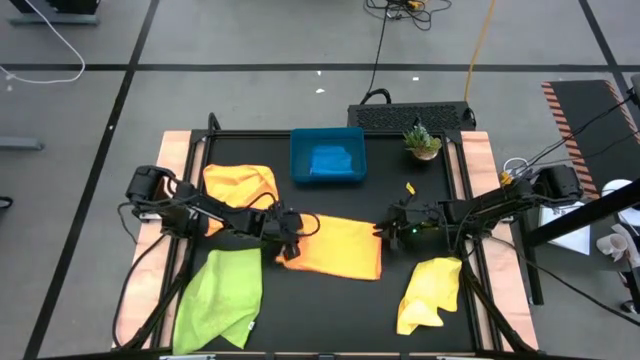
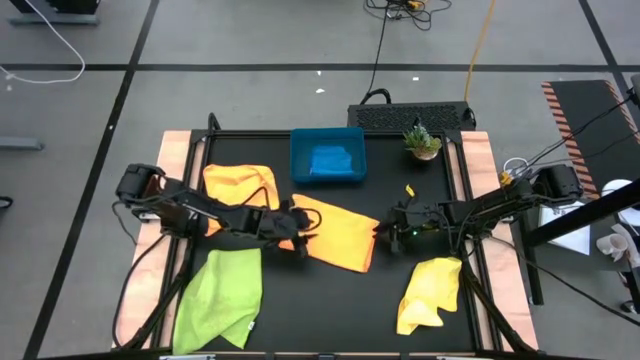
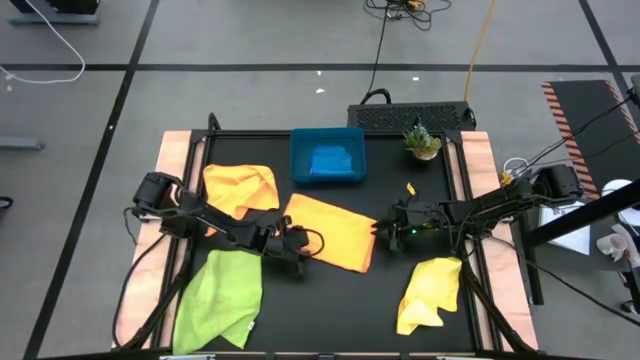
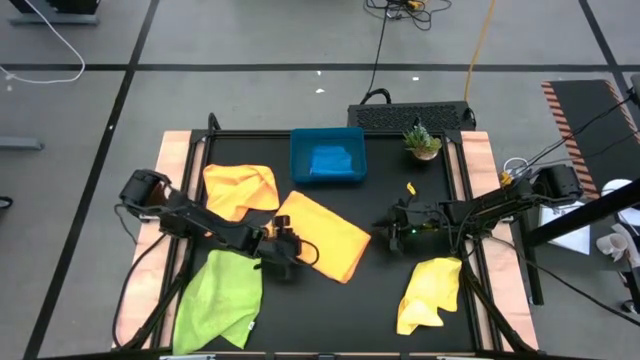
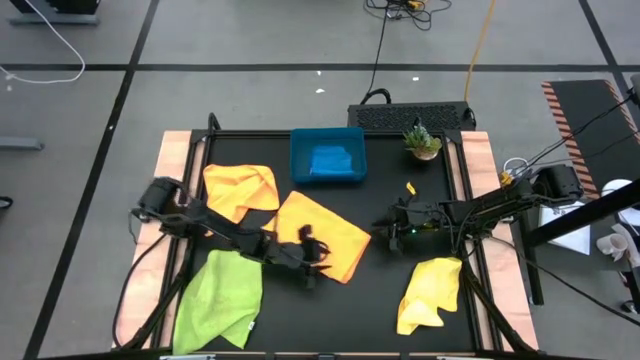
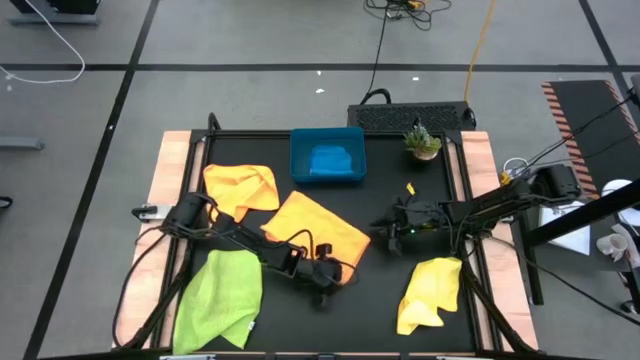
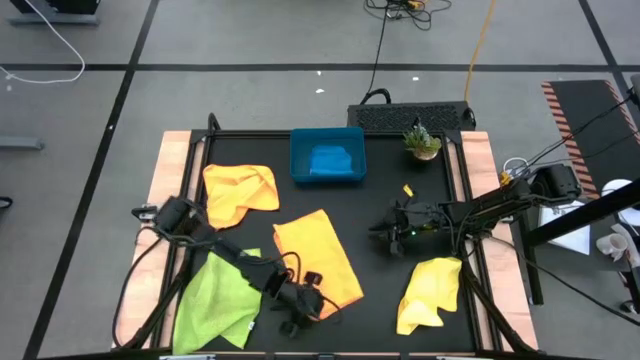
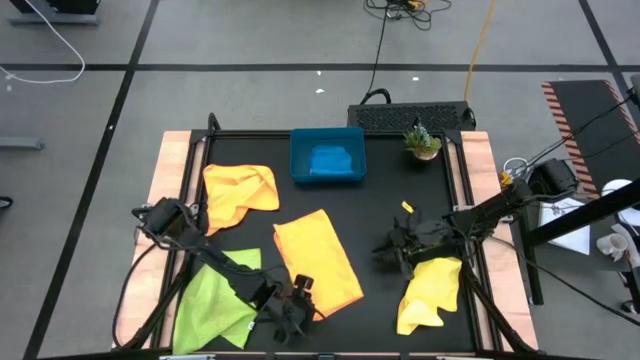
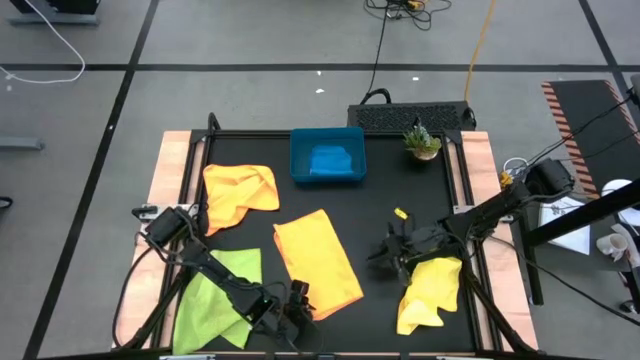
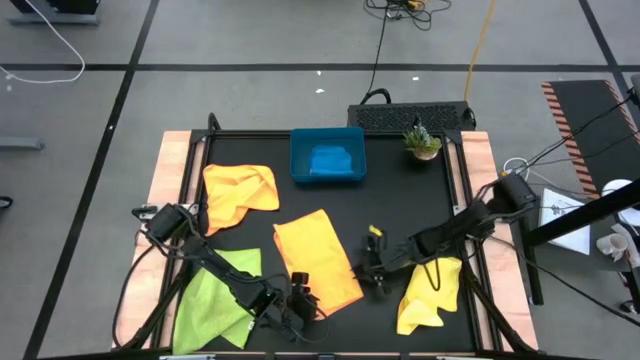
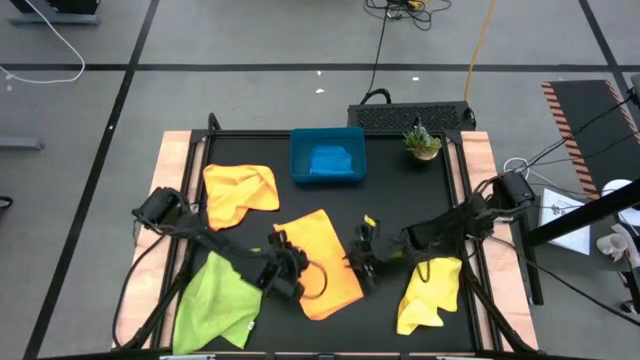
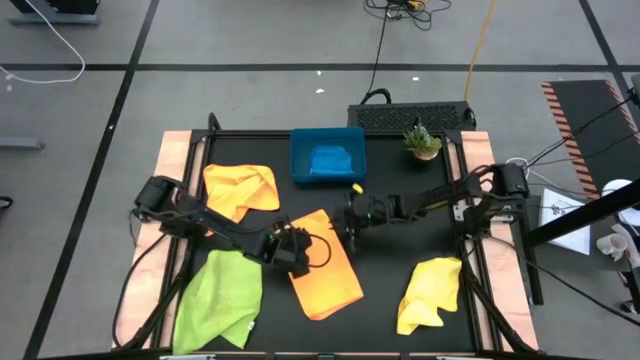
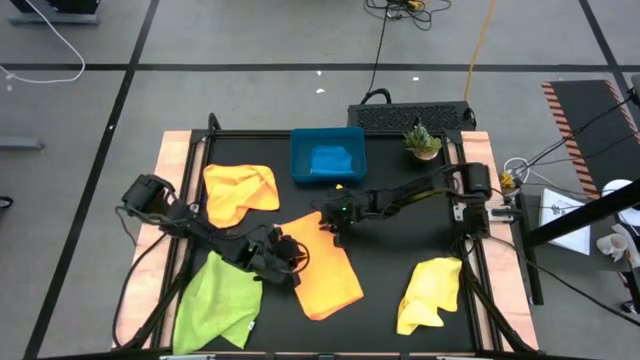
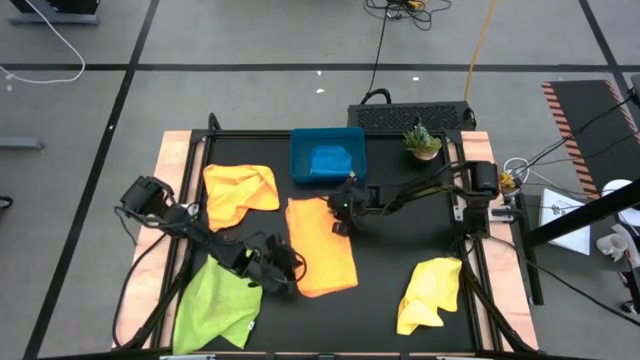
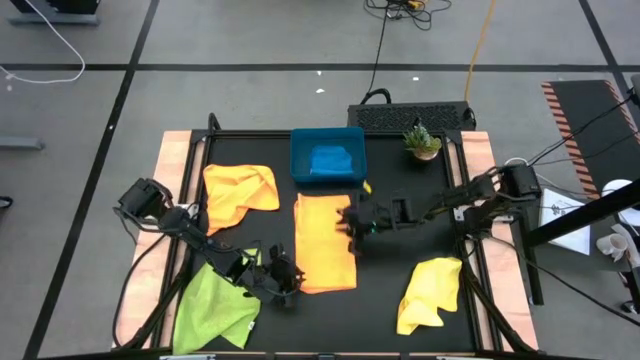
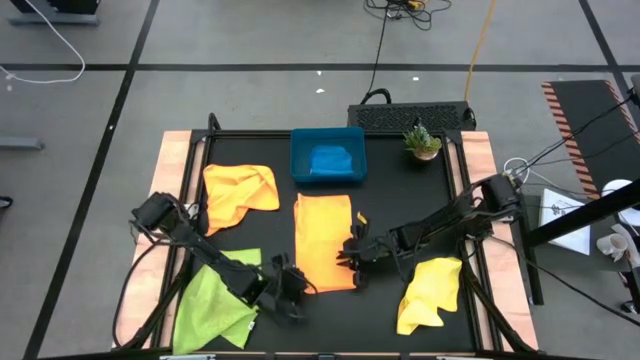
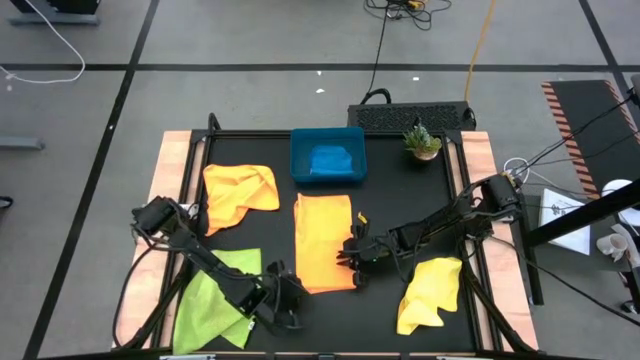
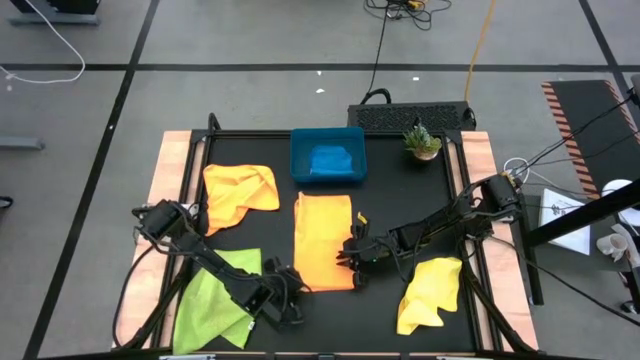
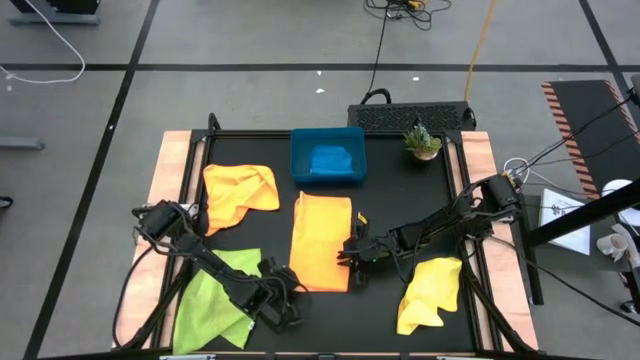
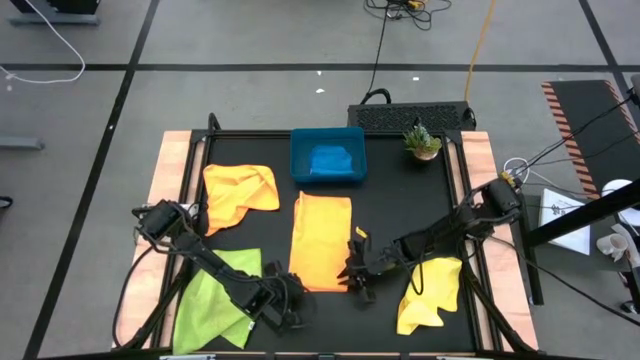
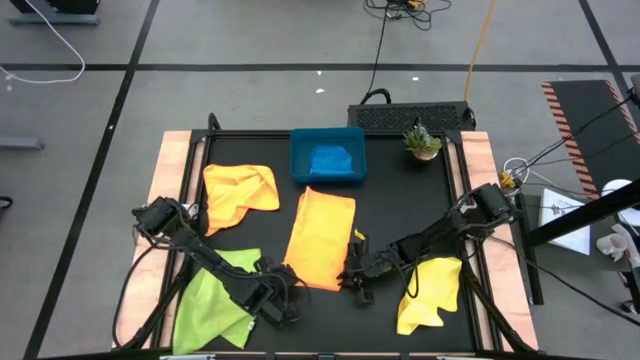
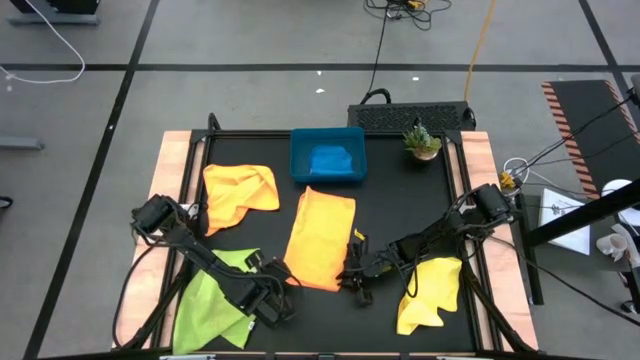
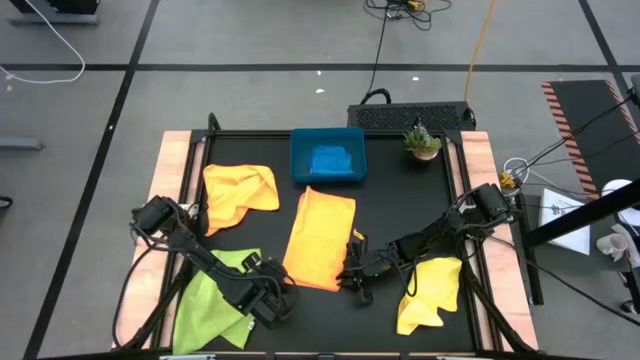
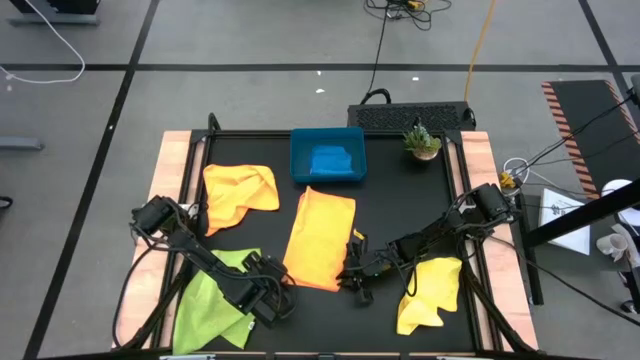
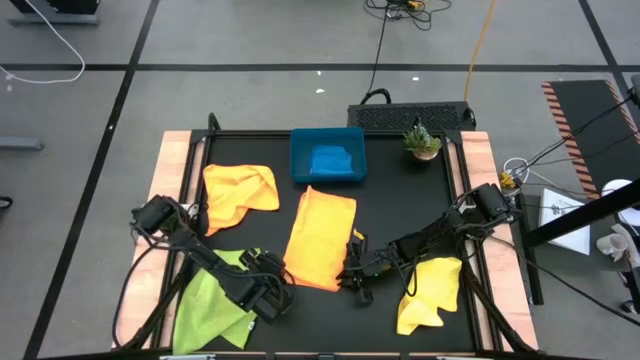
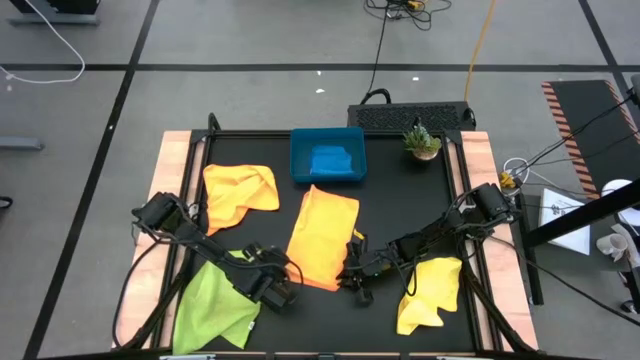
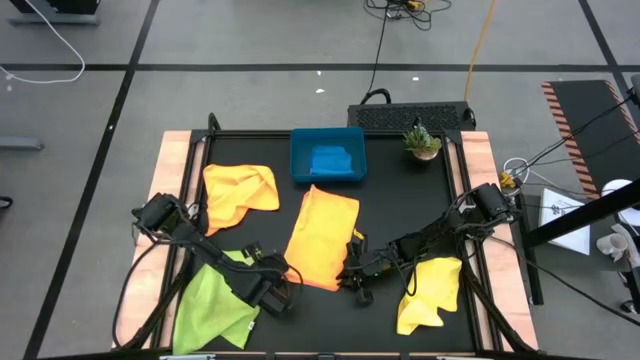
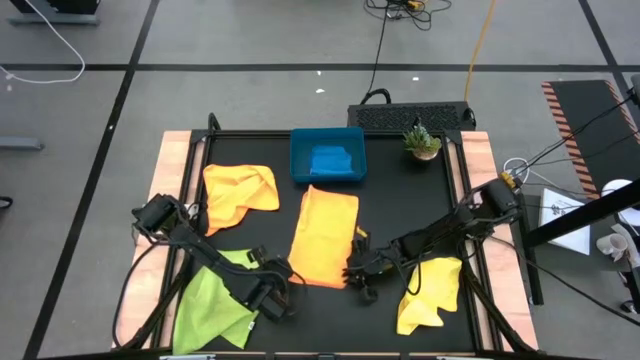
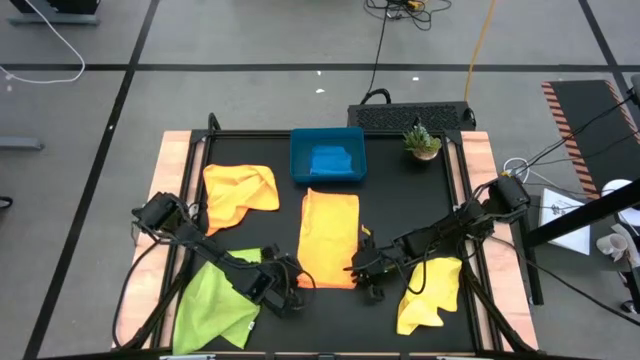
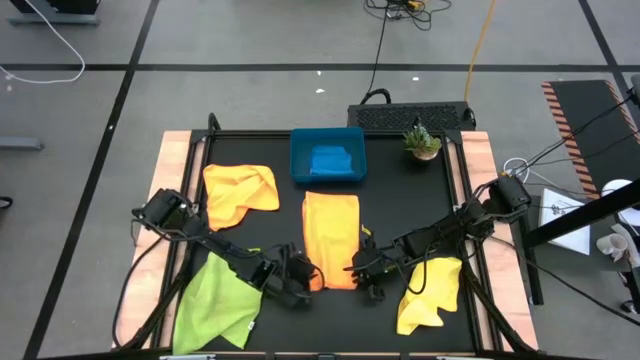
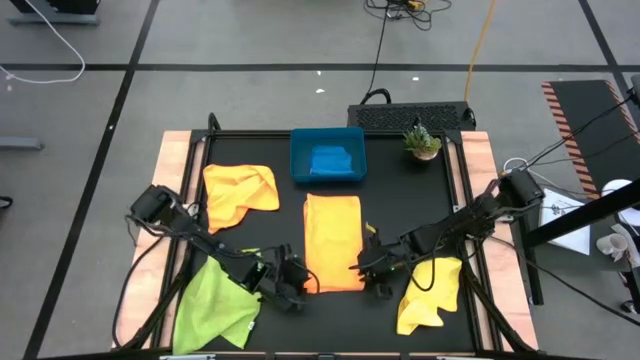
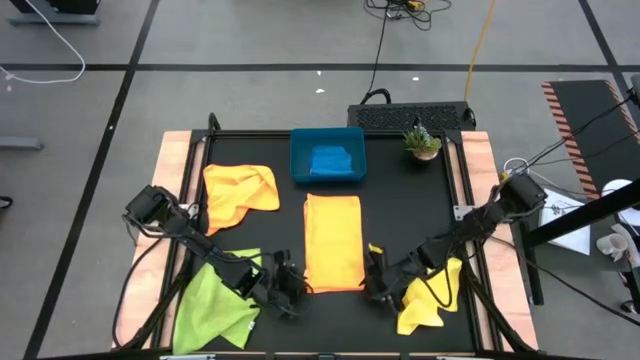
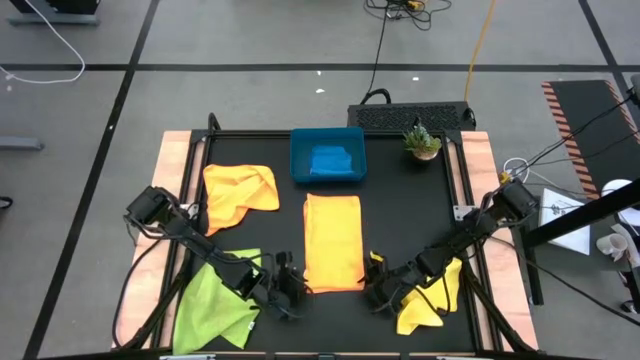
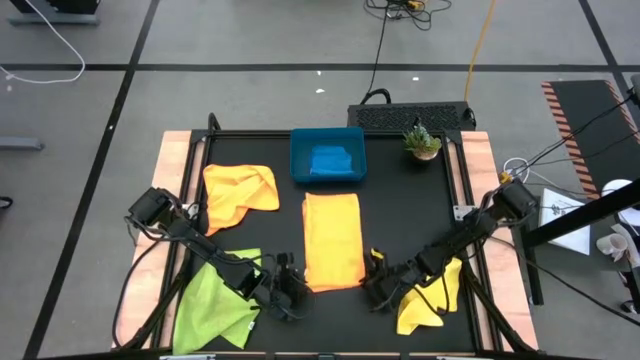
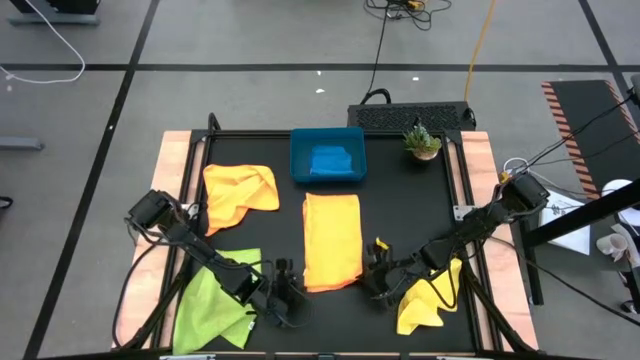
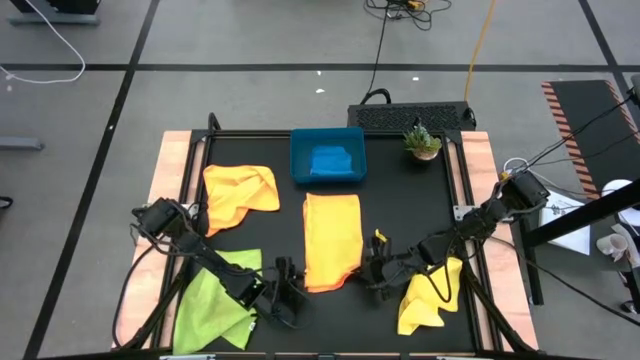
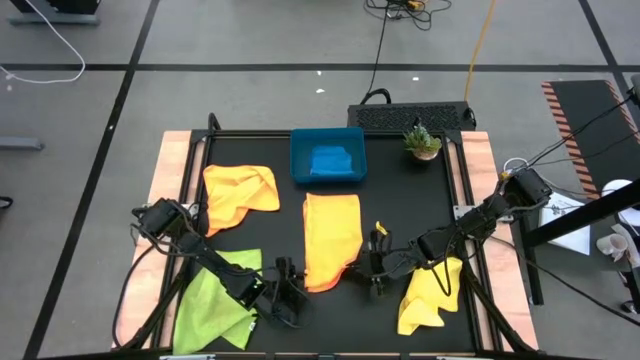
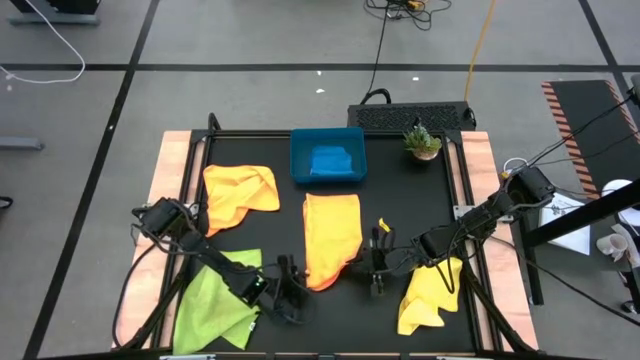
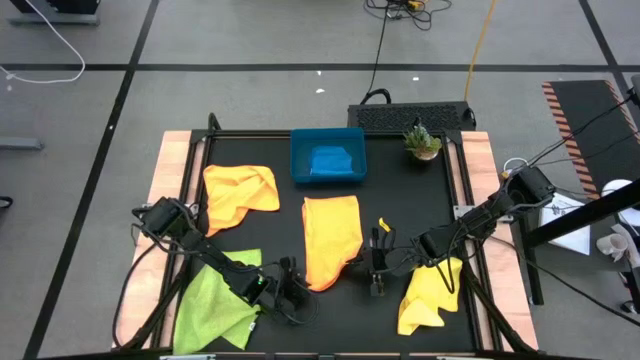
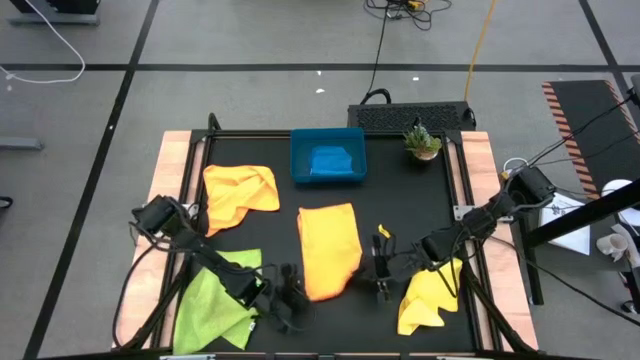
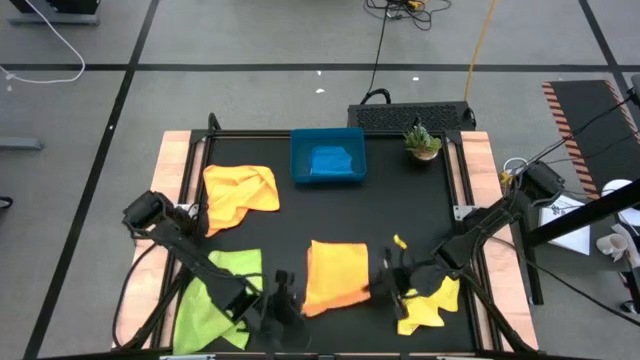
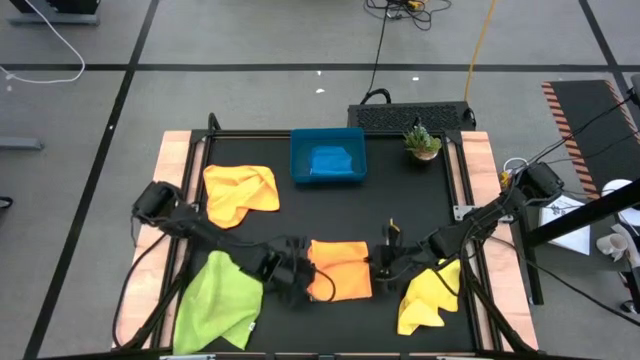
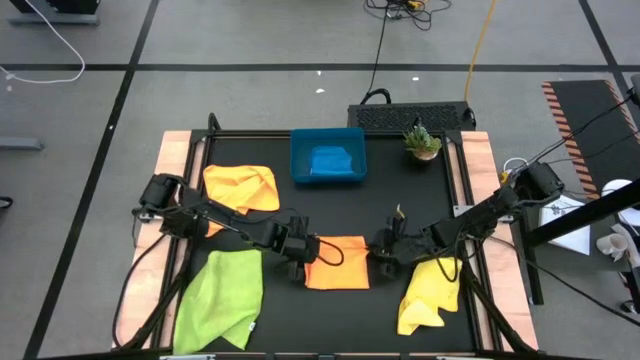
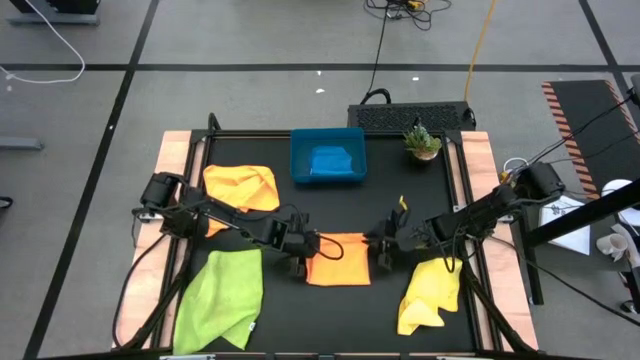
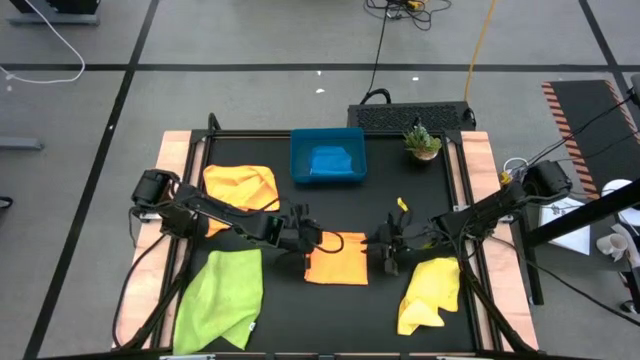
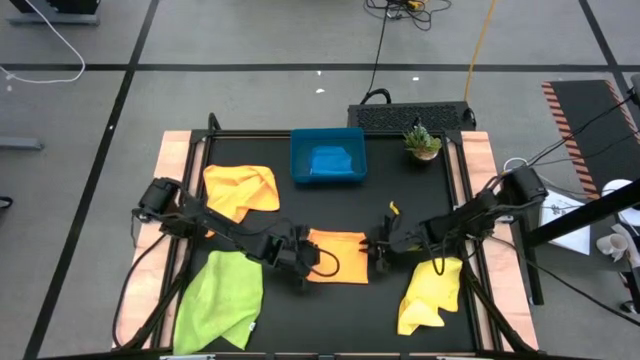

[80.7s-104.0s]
Task: Fold microfiber towels
Fold the right orange microfiber cloth
